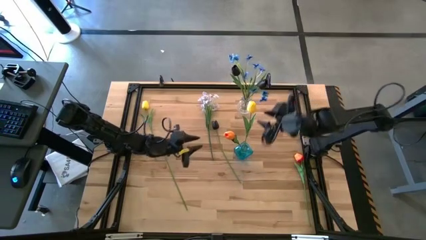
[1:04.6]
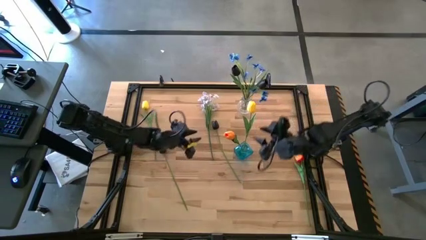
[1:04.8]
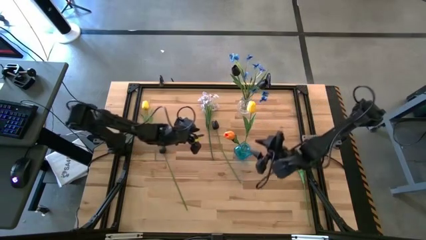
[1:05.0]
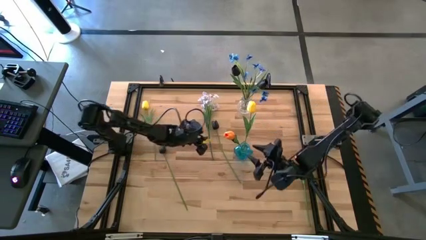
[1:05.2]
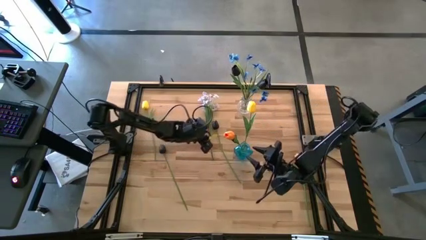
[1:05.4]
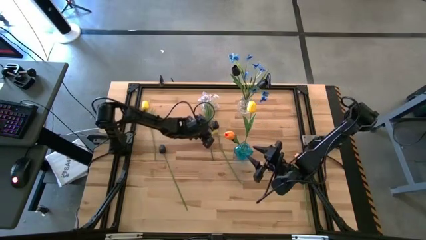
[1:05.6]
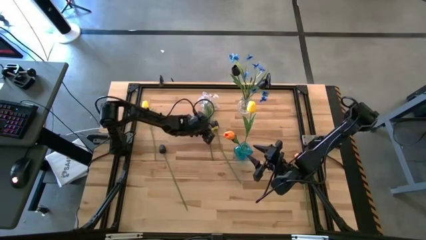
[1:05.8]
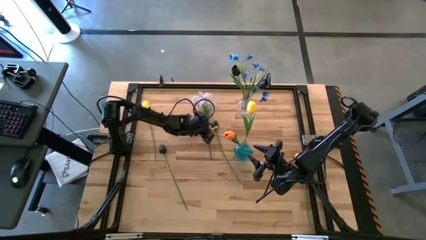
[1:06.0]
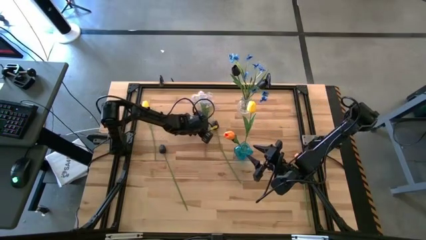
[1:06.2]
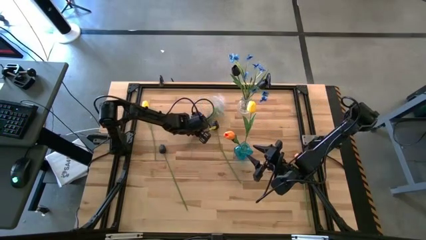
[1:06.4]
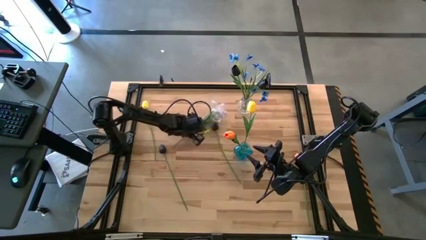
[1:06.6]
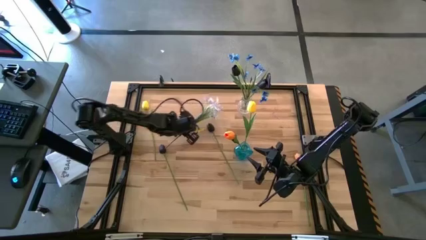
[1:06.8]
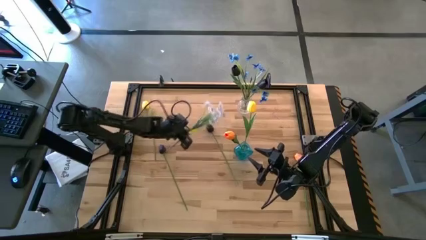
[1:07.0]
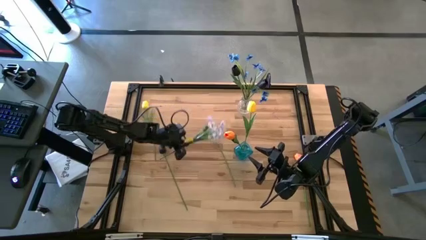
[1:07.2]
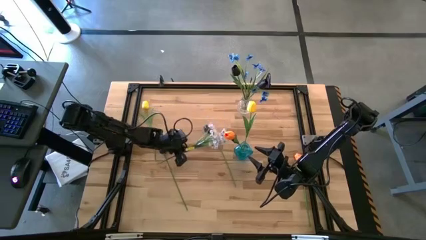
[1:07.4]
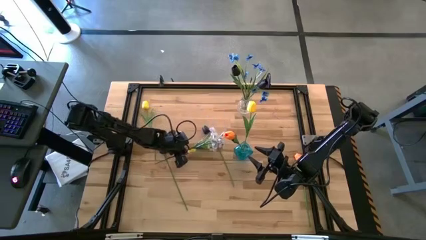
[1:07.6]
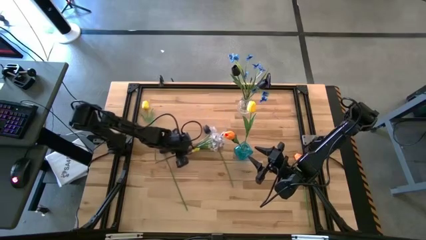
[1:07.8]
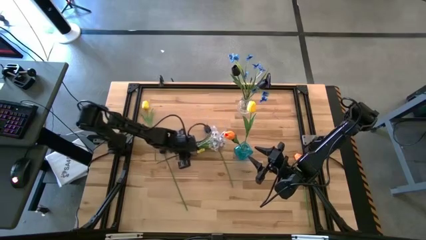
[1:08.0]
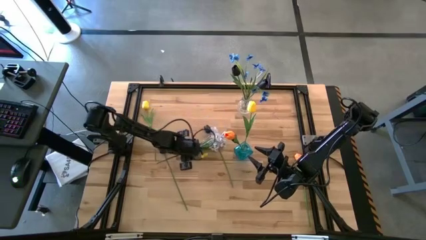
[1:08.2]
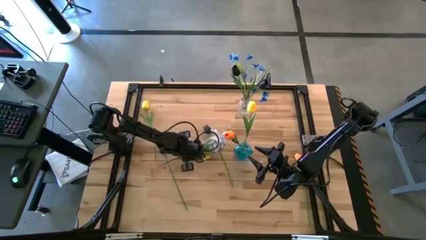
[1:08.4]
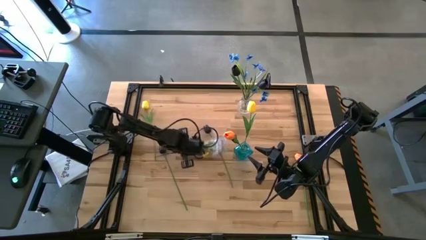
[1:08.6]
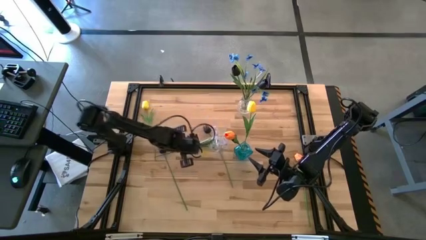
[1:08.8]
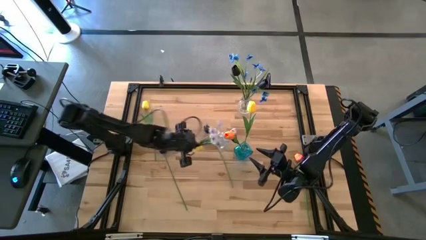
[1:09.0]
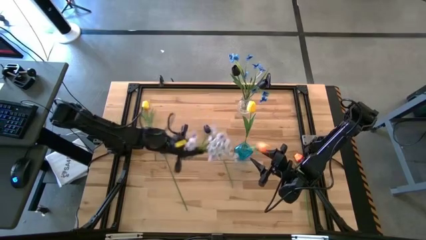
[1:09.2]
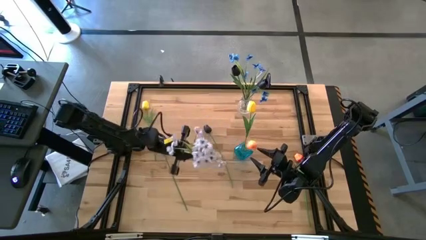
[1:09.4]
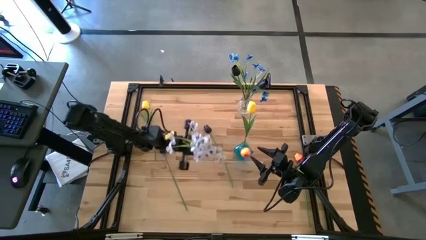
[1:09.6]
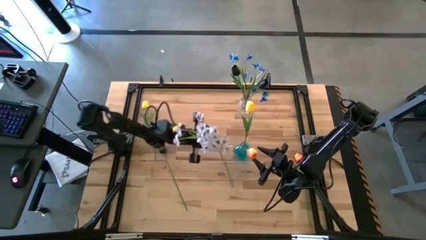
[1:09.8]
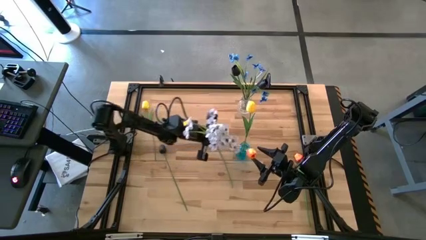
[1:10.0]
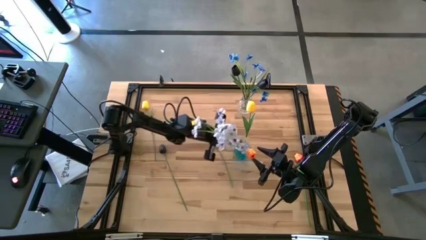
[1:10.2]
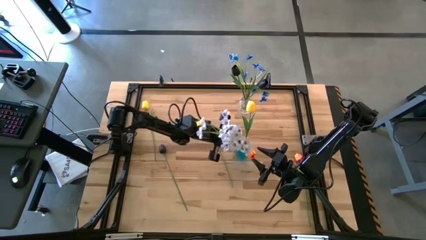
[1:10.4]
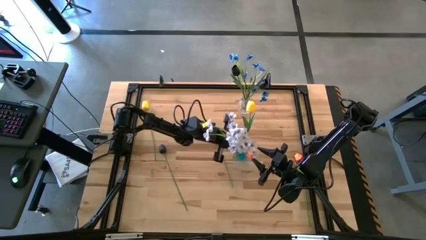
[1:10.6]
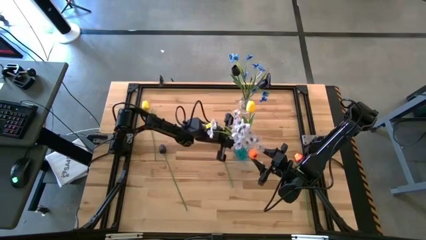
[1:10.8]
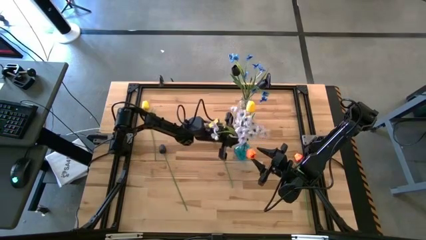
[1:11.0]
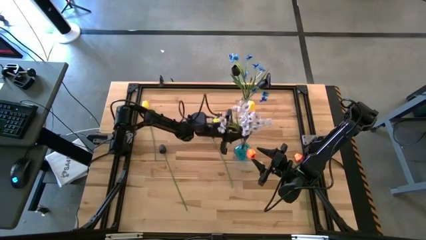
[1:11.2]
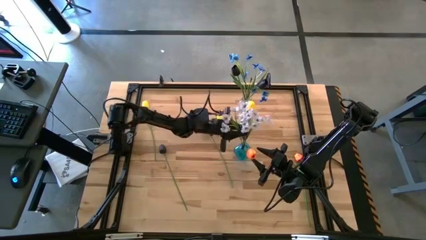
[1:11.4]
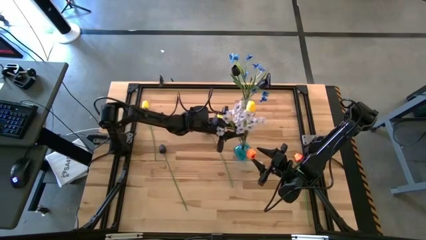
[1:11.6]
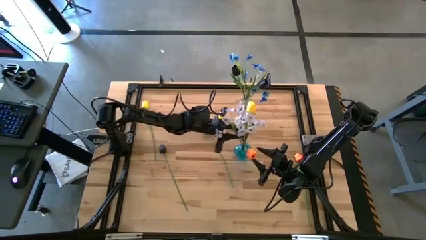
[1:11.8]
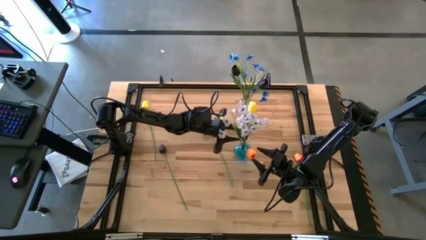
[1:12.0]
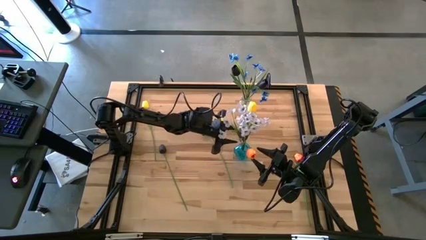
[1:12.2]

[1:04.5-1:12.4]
Task: Sort flowers into vase by color
Put the white flowers into the blue flower vase

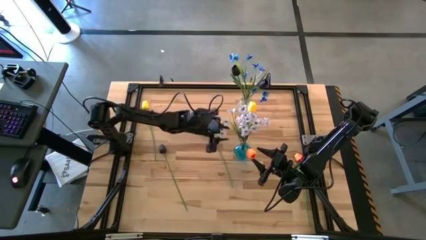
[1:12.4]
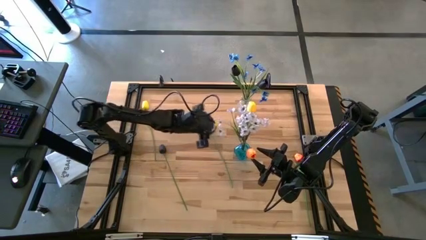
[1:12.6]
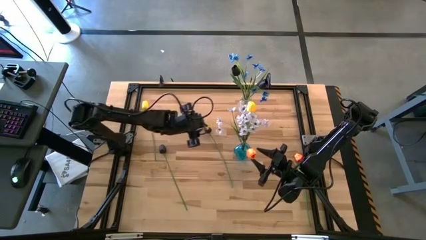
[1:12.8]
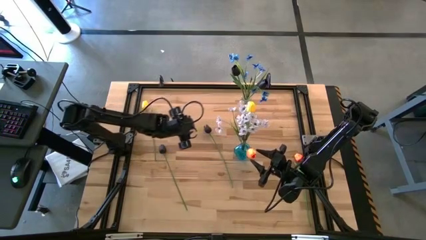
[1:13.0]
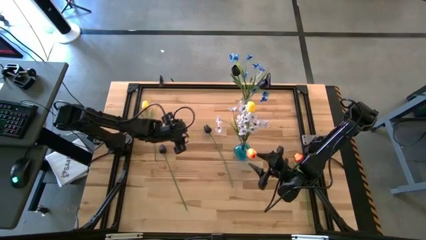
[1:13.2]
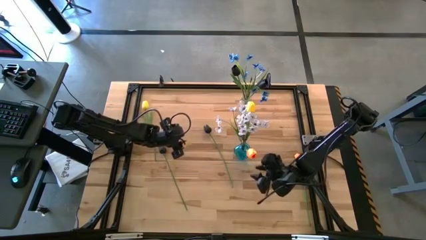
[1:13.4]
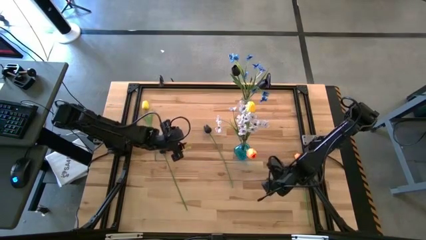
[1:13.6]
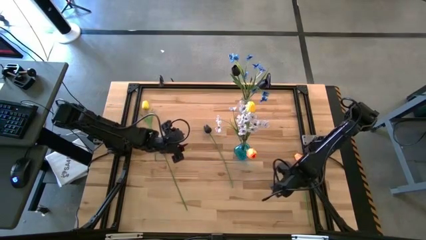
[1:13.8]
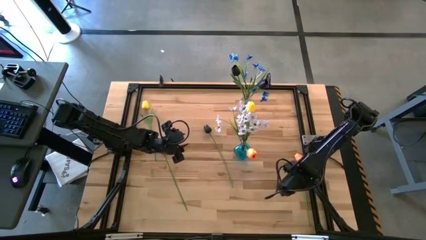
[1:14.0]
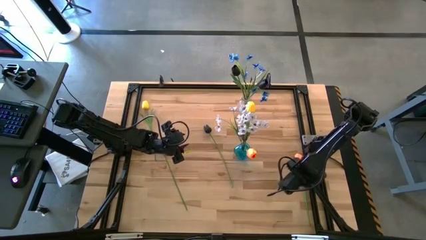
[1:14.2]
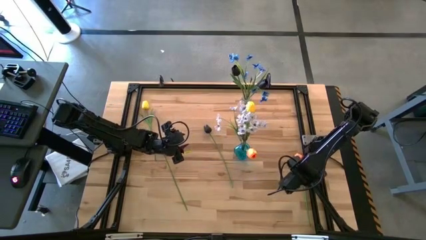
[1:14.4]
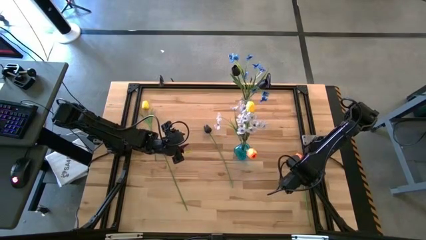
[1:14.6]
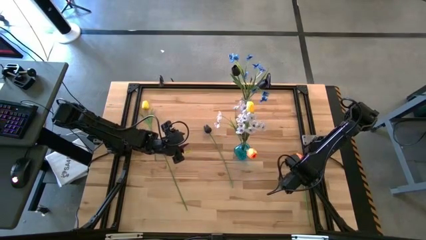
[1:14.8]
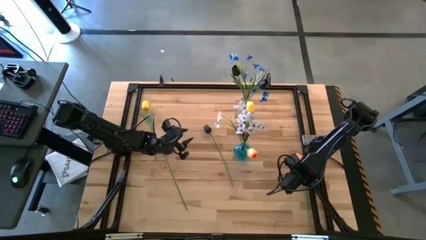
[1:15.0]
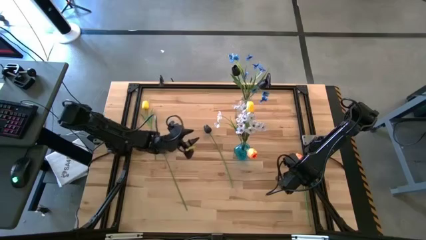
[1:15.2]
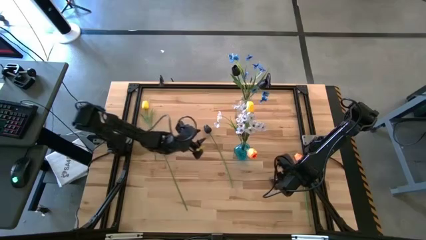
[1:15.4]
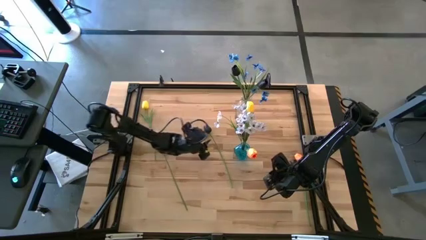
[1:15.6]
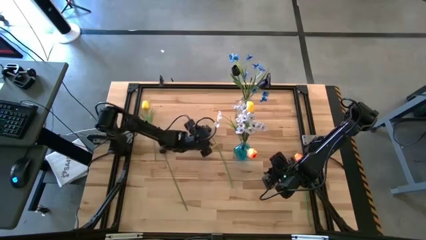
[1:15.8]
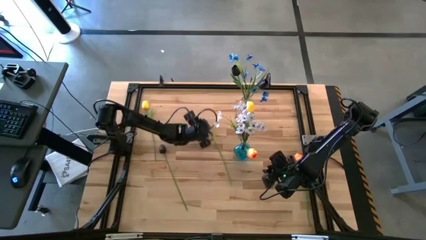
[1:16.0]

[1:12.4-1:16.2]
Put the black tulip into the transparent flower vase
